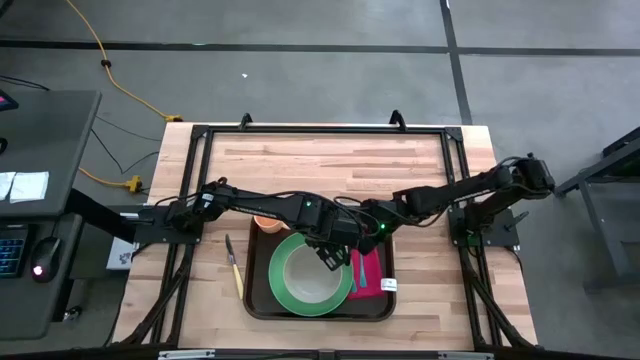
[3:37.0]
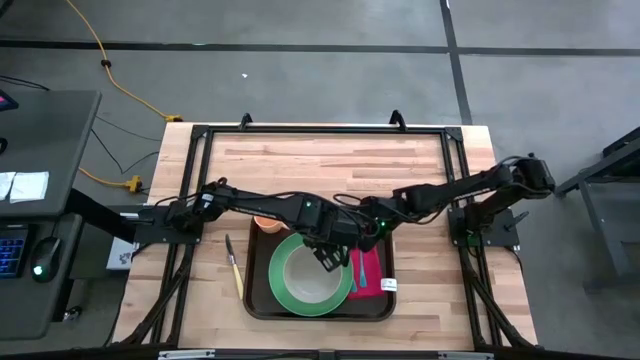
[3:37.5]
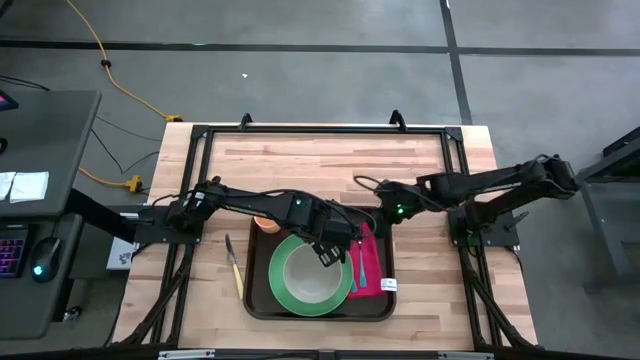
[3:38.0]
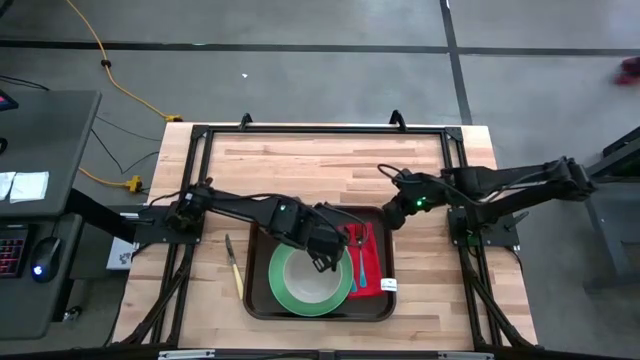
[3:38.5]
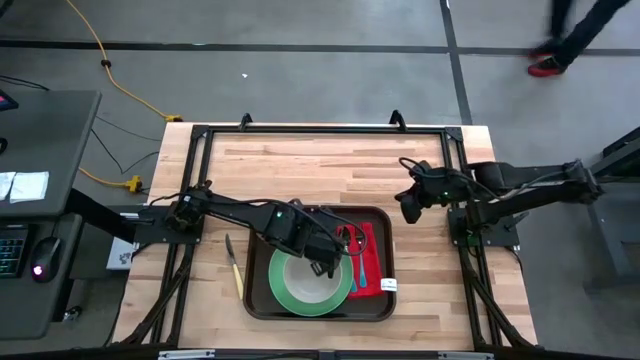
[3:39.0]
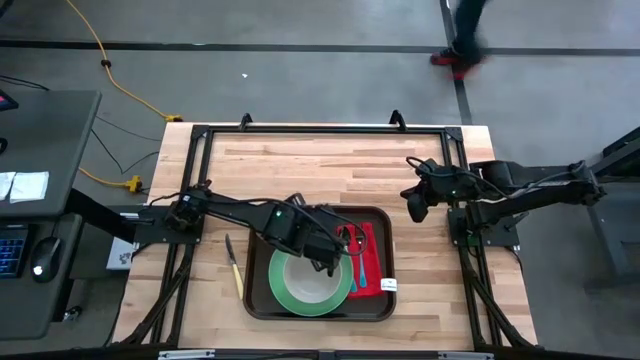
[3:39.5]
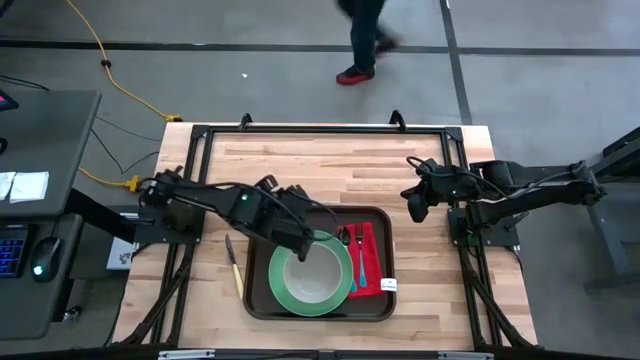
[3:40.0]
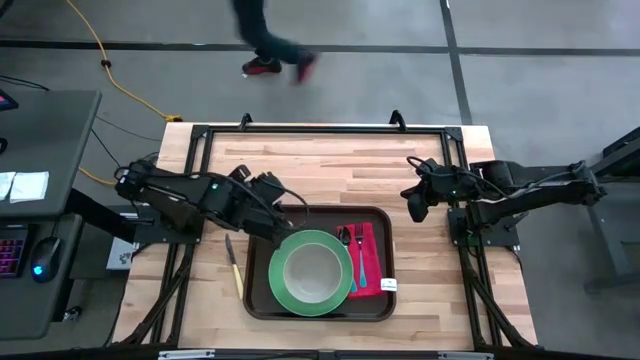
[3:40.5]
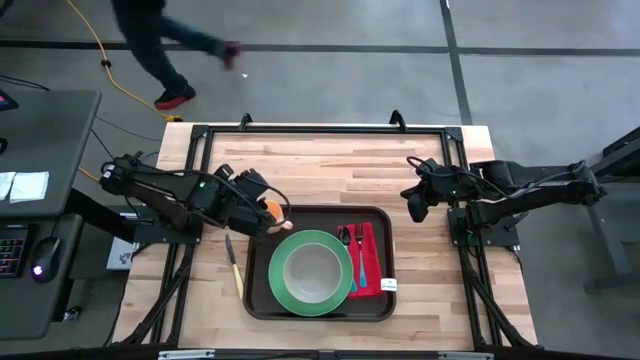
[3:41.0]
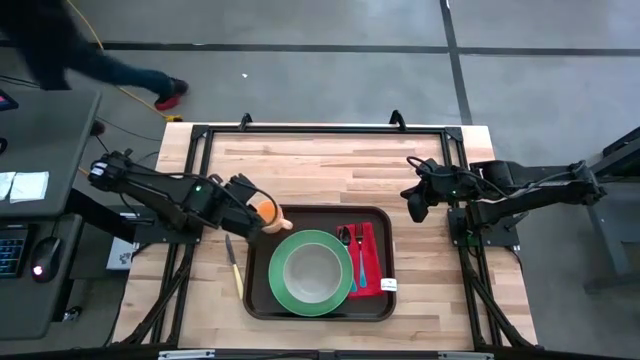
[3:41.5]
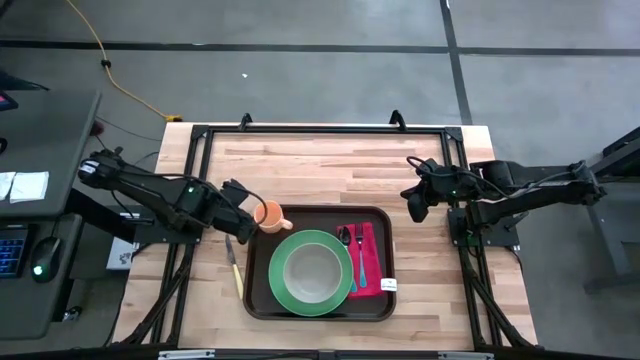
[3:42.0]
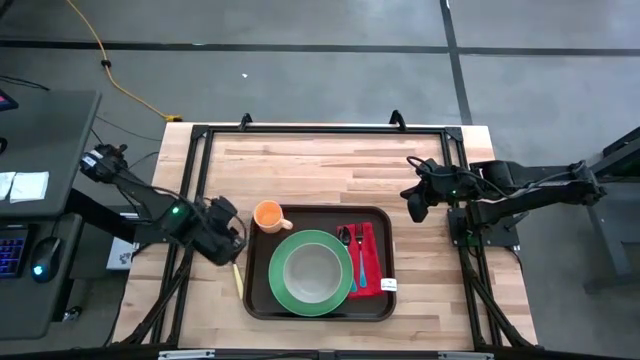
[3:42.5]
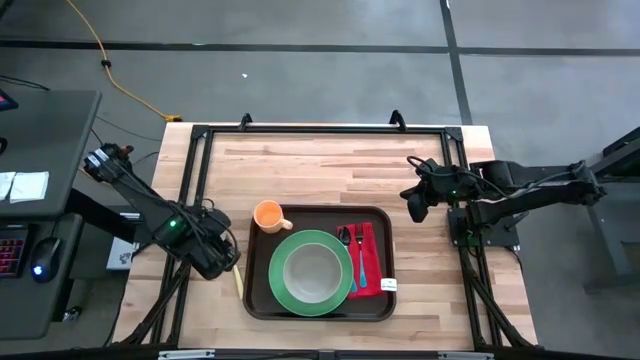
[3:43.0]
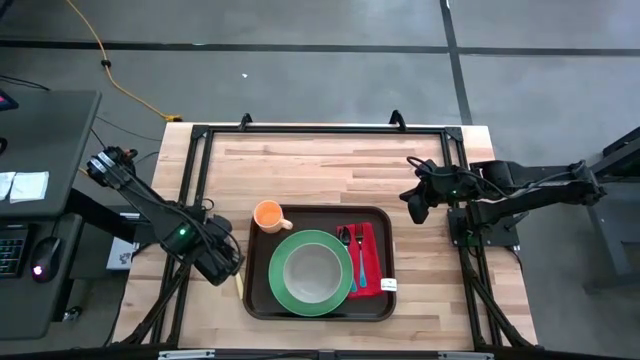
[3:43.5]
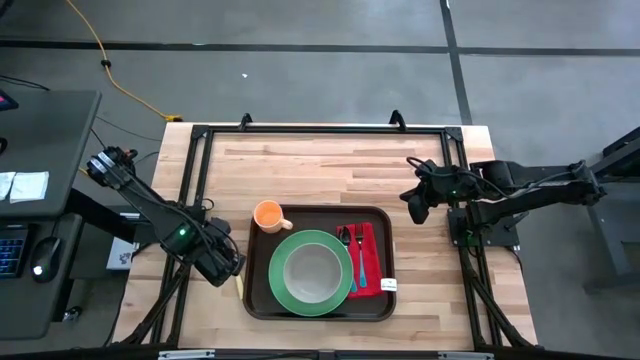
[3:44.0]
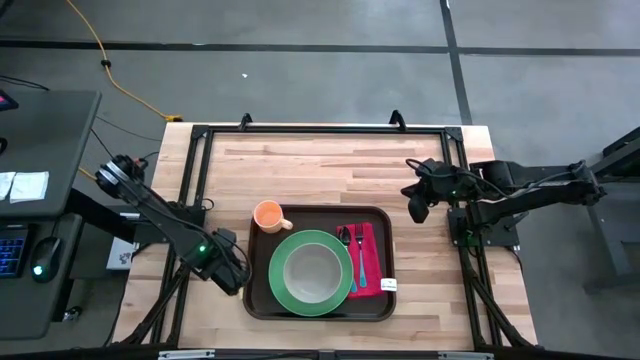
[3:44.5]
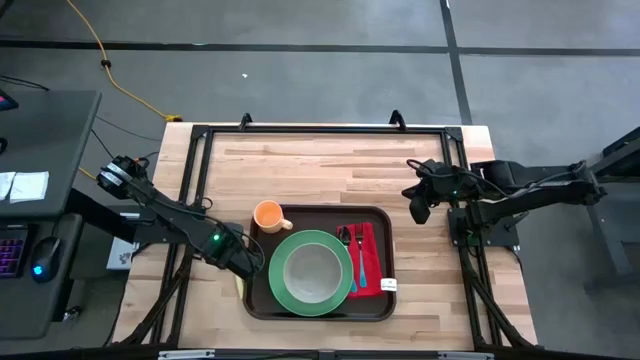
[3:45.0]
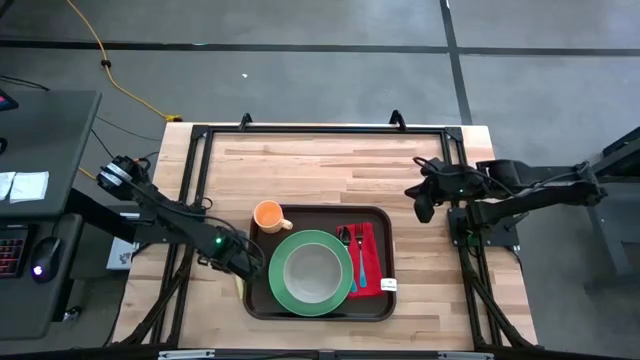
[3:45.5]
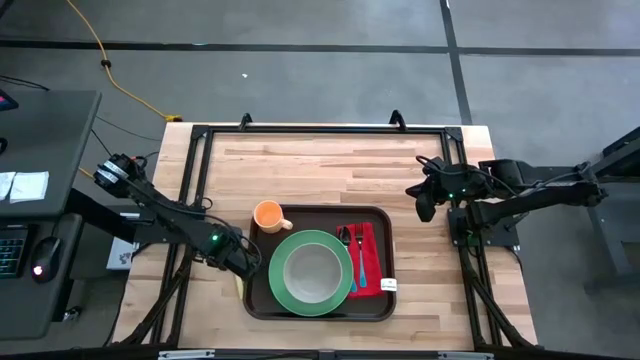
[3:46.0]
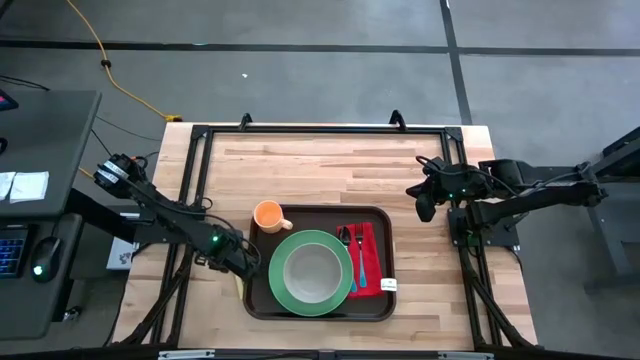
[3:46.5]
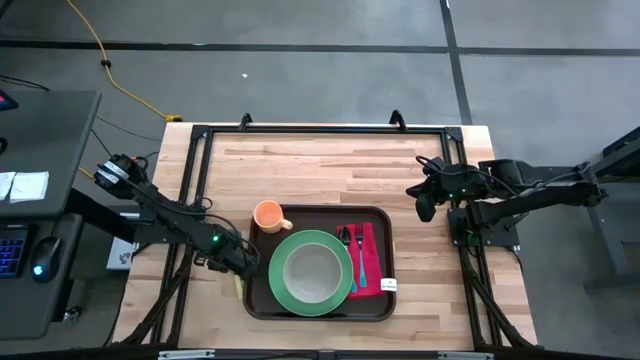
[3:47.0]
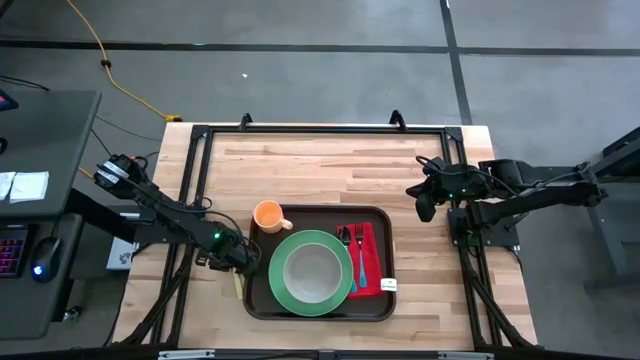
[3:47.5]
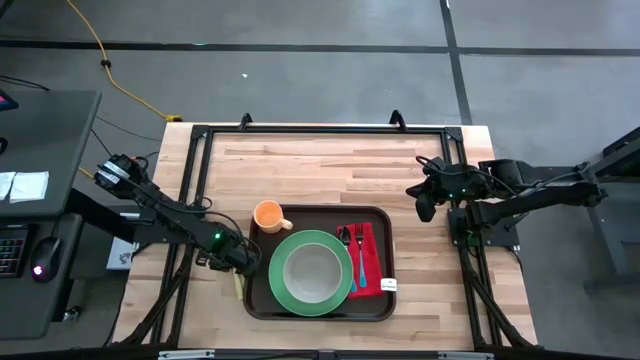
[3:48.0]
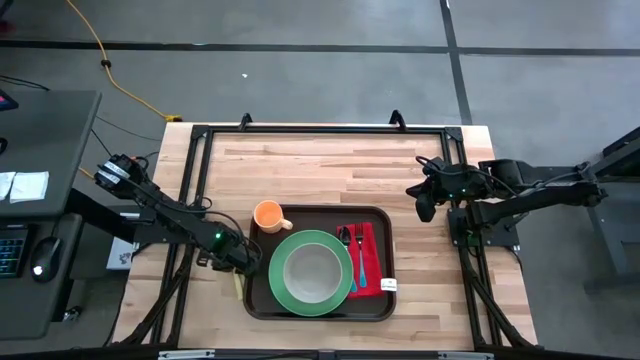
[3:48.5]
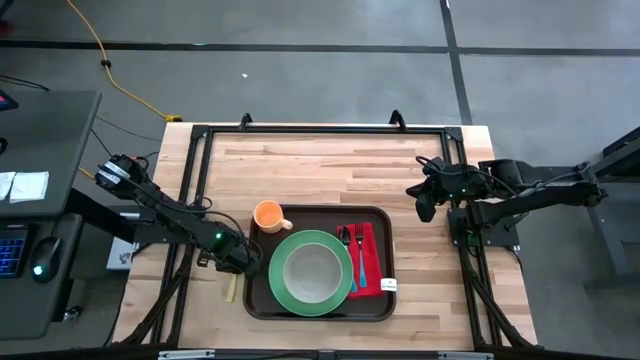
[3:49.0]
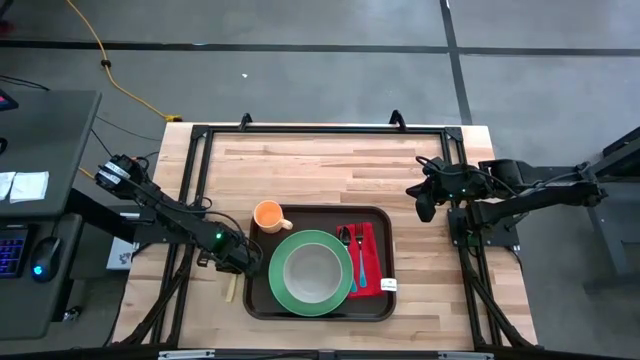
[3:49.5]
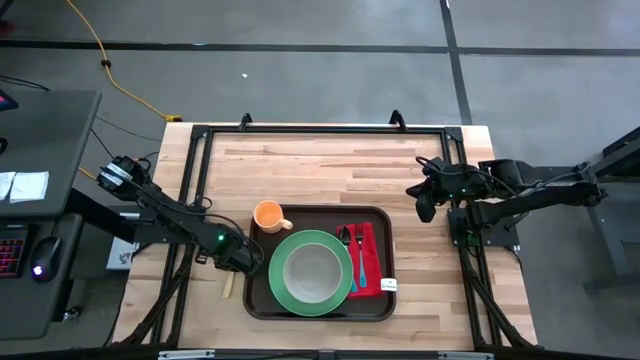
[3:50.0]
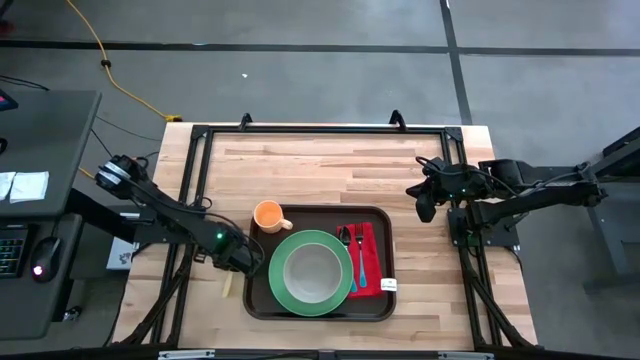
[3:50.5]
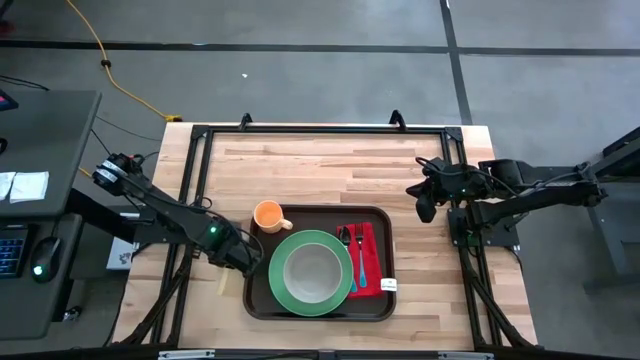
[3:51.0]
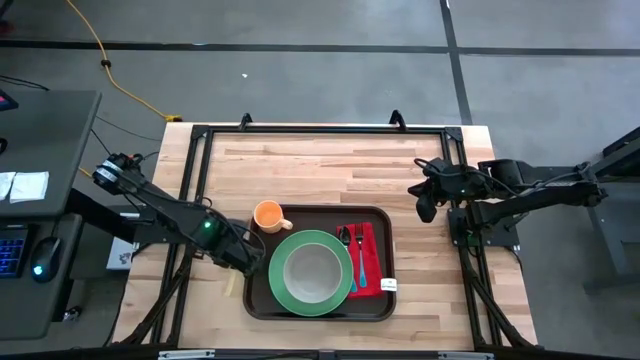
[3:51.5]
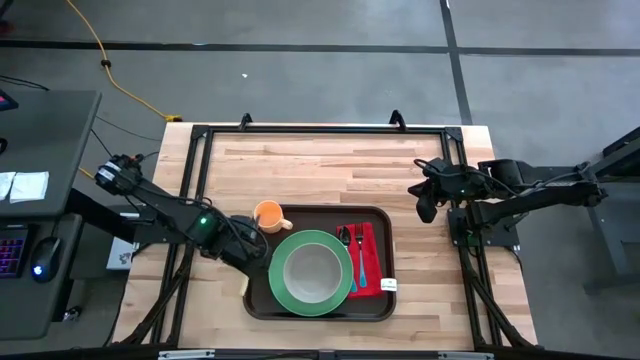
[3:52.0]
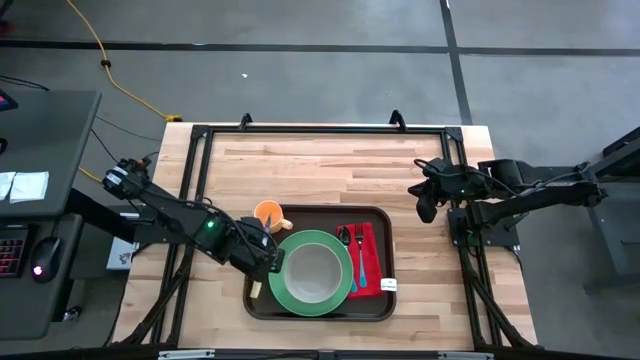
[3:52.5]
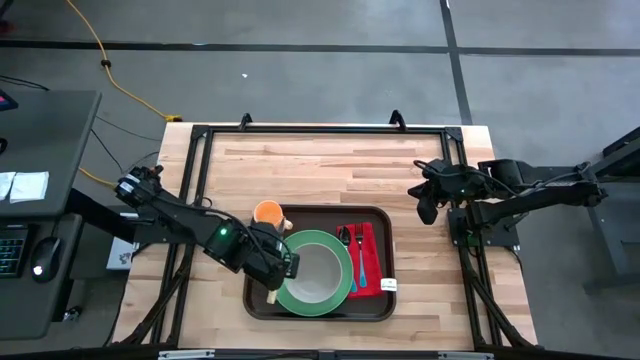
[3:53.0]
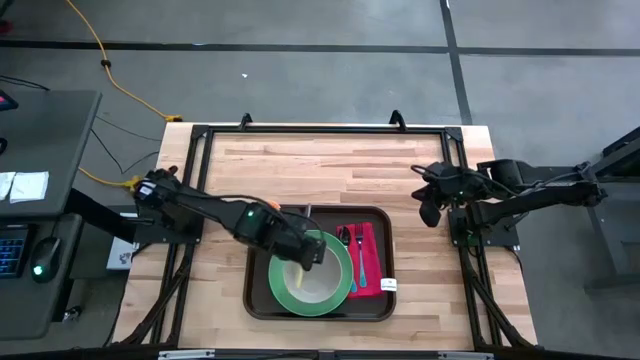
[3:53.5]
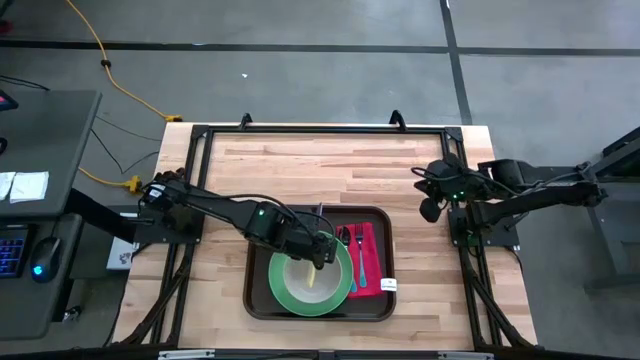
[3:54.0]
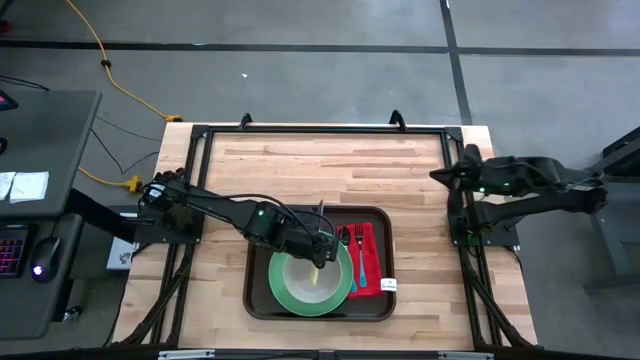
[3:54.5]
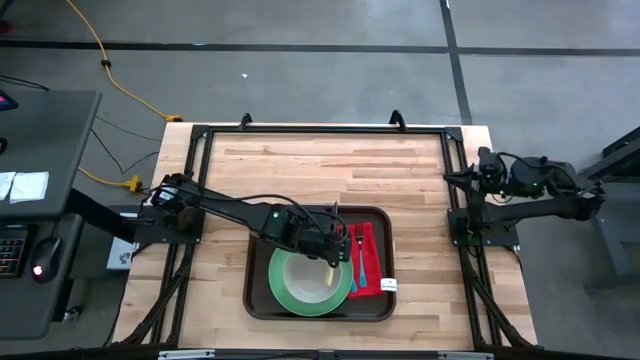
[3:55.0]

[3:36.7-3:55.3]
Task: Set up tray
Put the yellow table knife on the red table napkin to the right of the blue fork

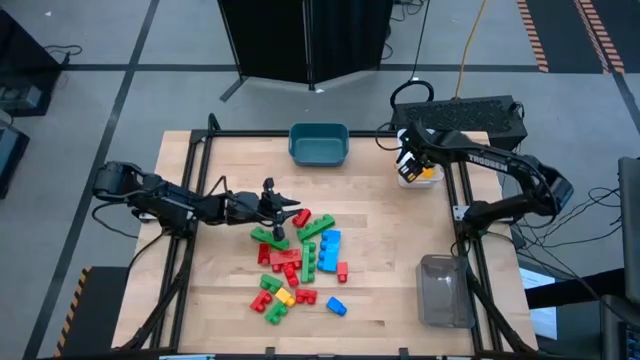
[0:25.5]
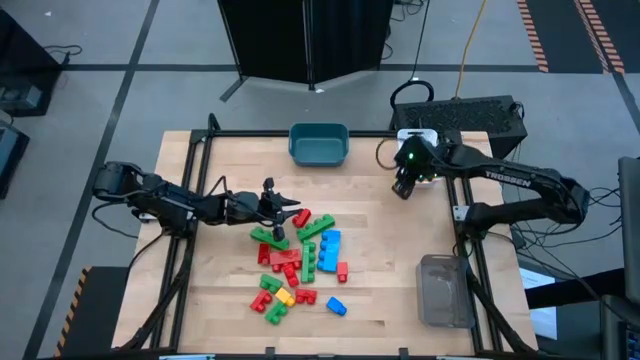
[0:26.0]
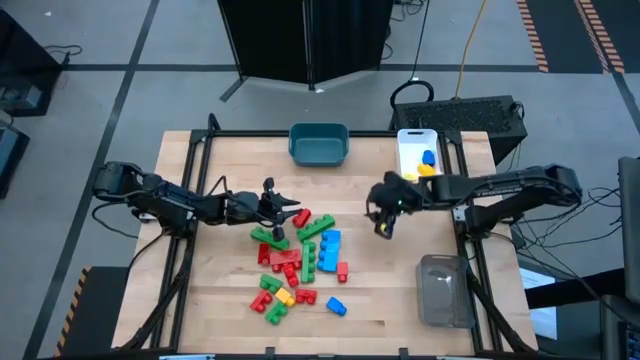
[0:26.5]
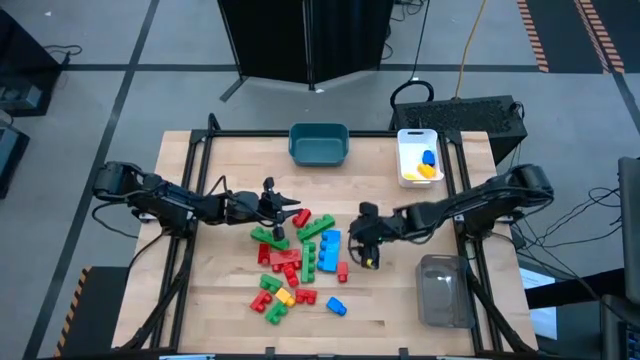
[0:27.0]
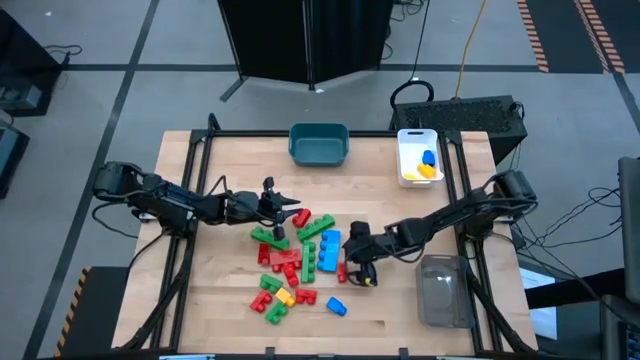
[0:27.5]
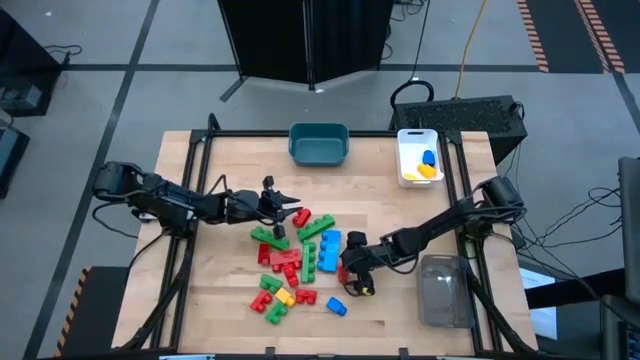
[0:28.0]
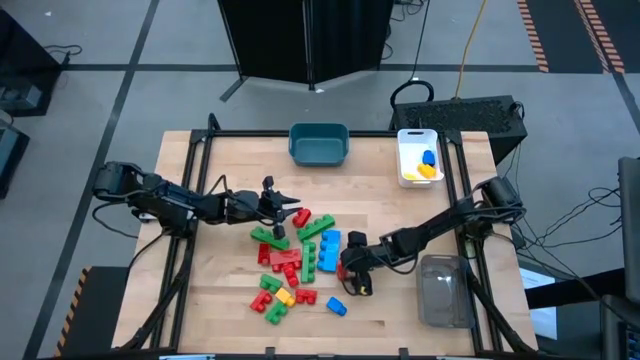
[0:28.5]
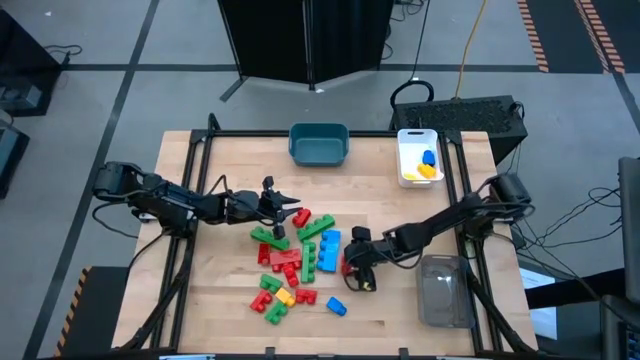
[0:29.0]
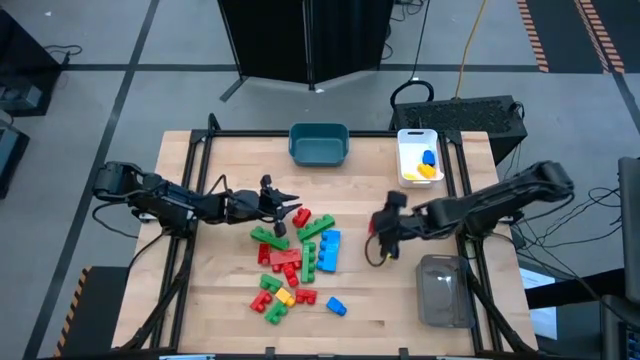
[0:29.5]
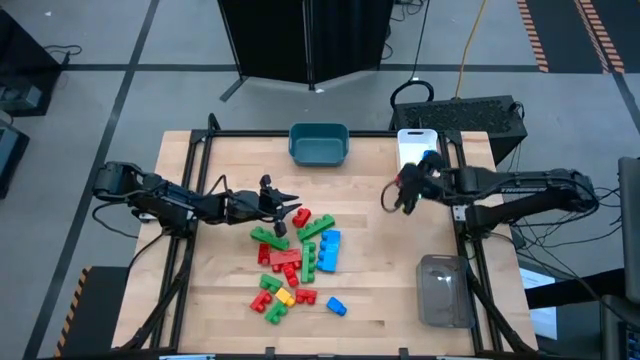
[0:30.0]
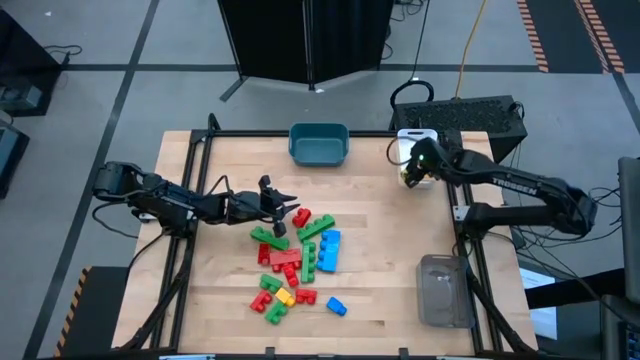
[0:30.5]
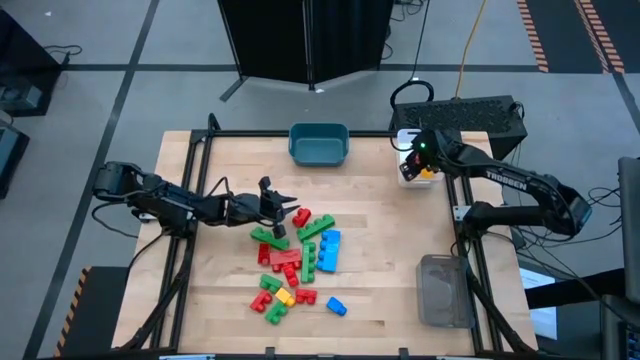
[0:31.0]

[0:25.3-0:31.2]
Task: Sort blocks by size
Put the one stud red game piece into the white bin
